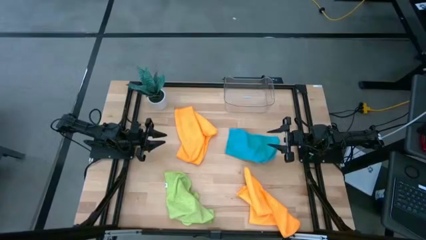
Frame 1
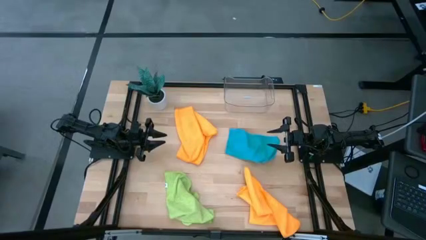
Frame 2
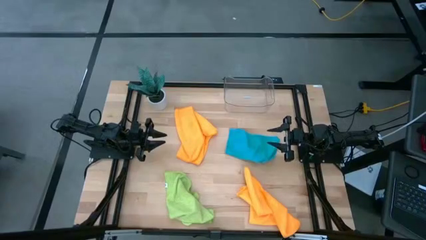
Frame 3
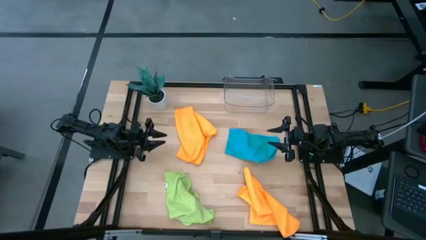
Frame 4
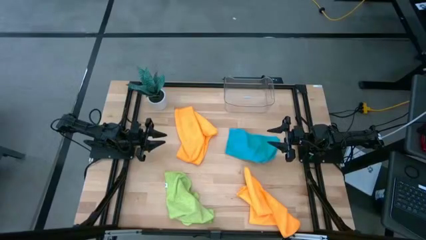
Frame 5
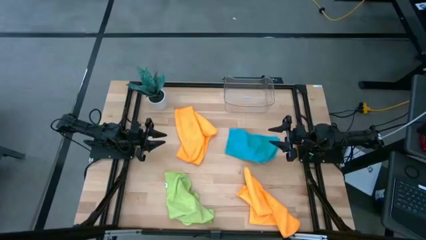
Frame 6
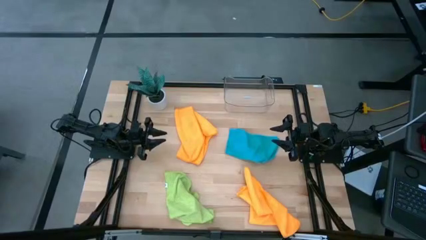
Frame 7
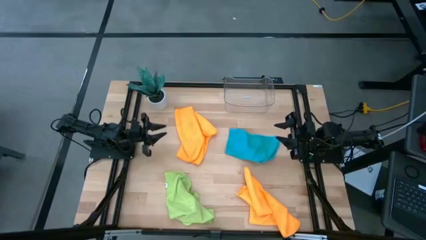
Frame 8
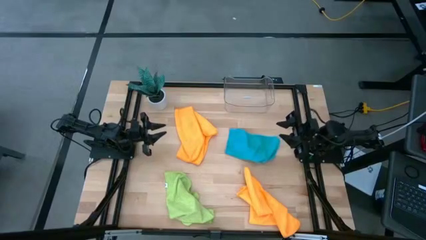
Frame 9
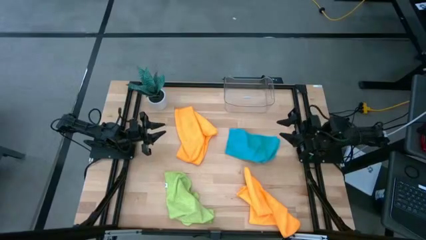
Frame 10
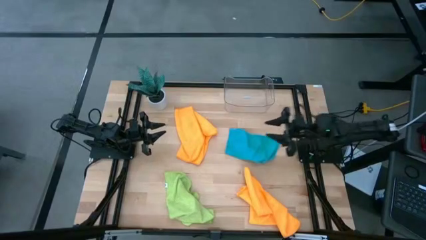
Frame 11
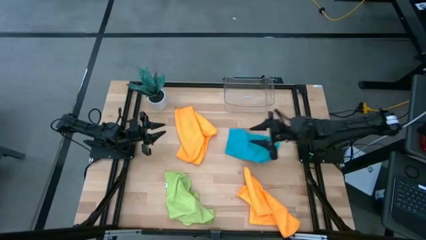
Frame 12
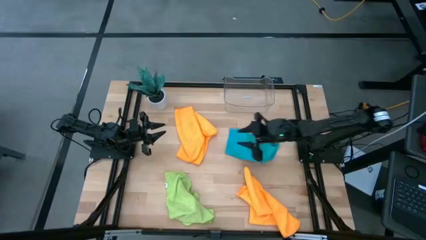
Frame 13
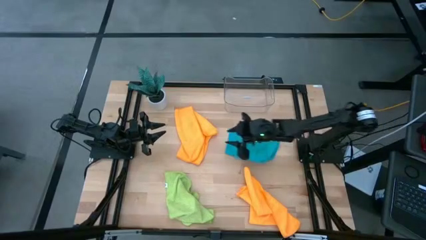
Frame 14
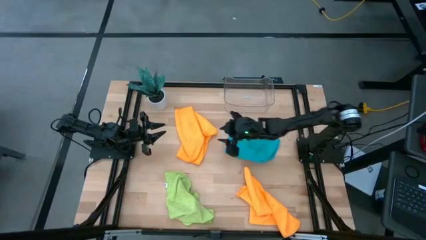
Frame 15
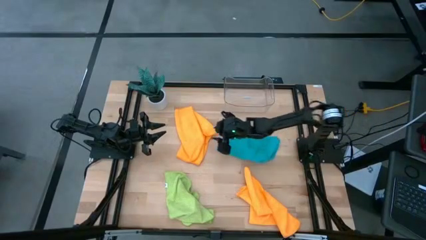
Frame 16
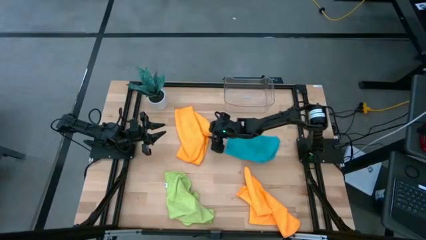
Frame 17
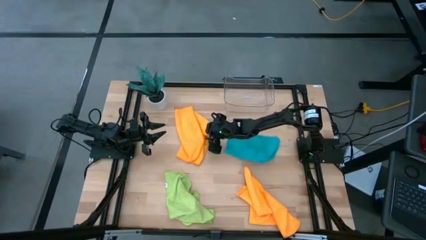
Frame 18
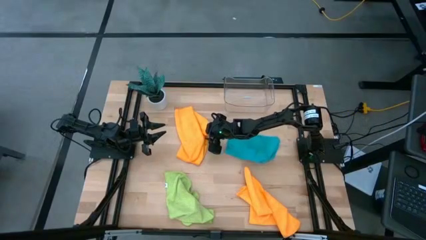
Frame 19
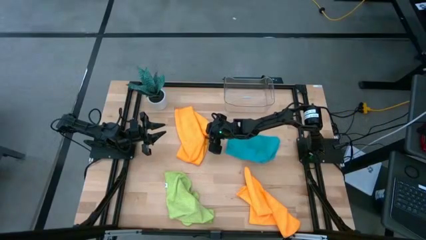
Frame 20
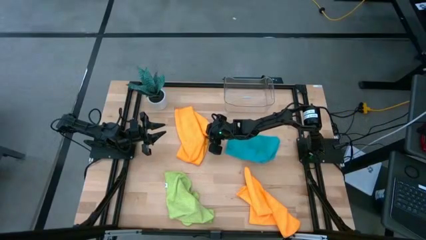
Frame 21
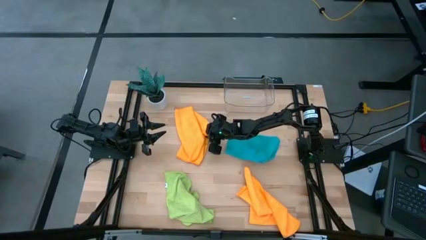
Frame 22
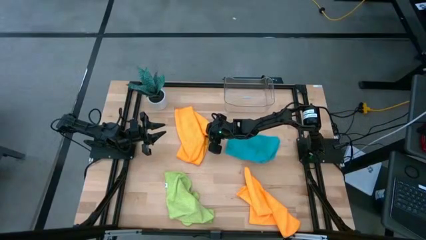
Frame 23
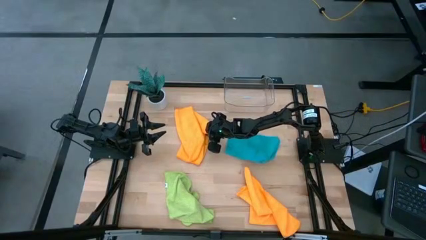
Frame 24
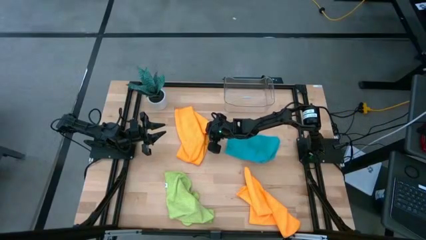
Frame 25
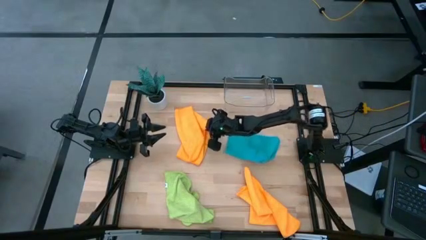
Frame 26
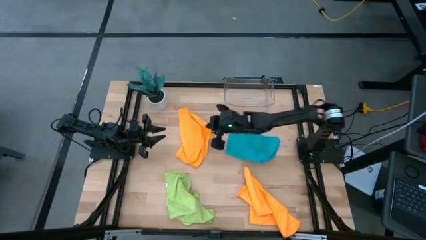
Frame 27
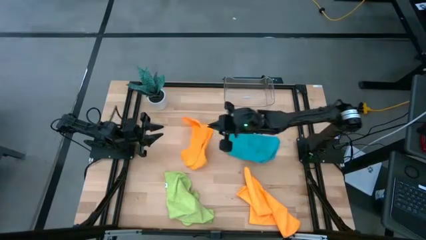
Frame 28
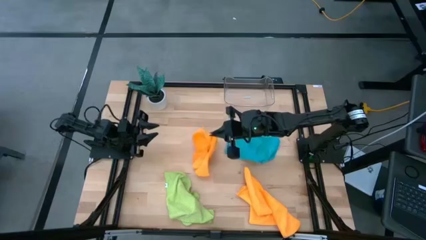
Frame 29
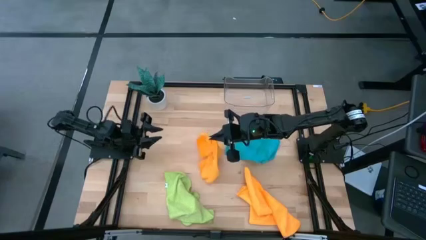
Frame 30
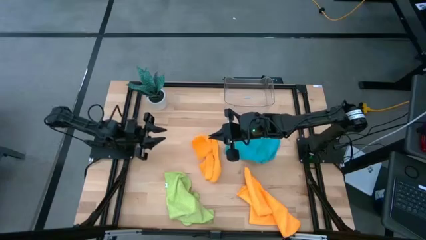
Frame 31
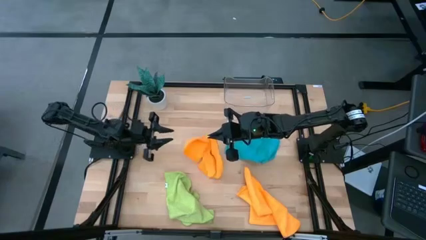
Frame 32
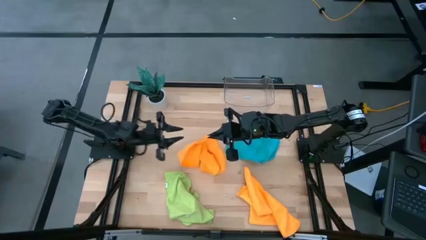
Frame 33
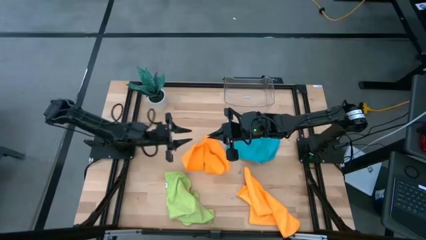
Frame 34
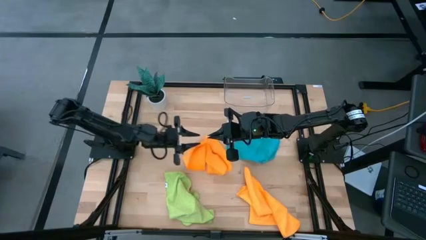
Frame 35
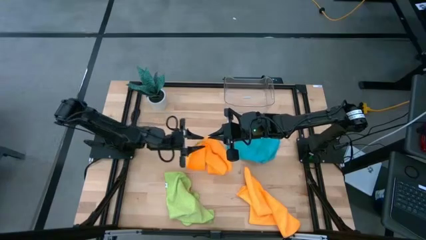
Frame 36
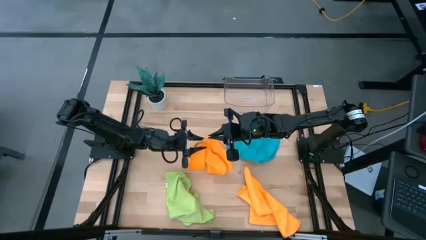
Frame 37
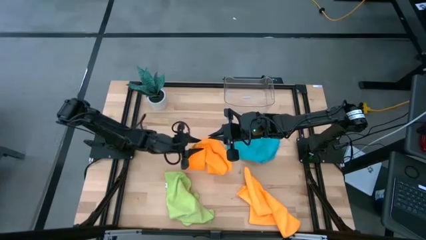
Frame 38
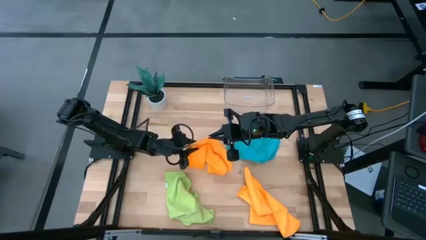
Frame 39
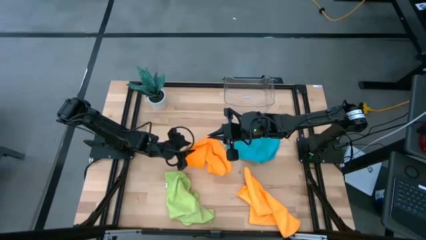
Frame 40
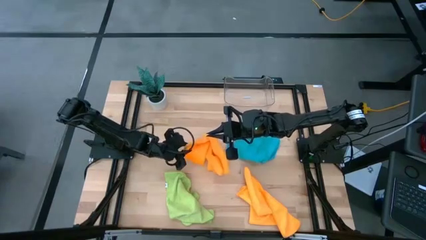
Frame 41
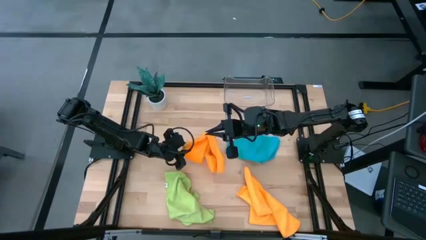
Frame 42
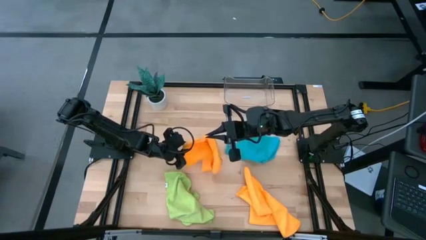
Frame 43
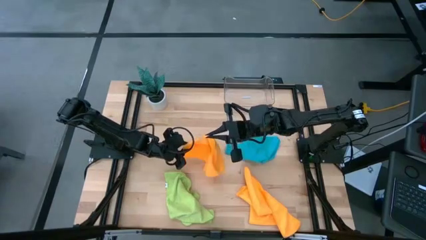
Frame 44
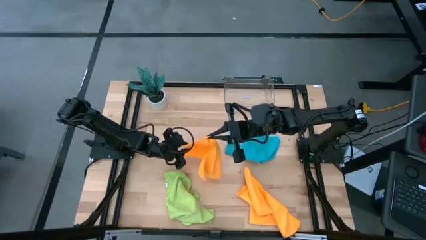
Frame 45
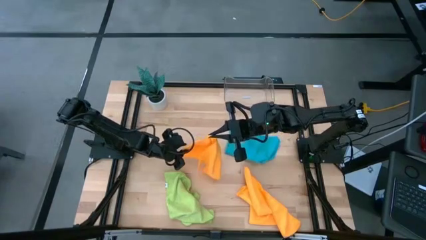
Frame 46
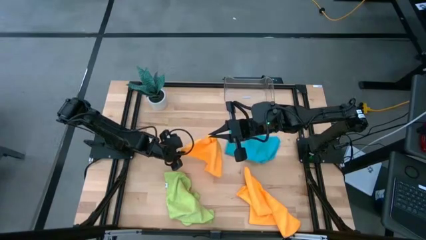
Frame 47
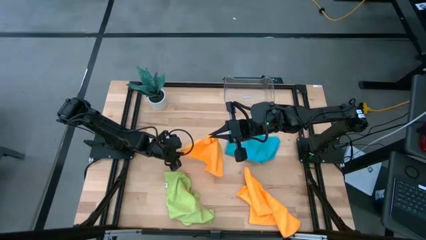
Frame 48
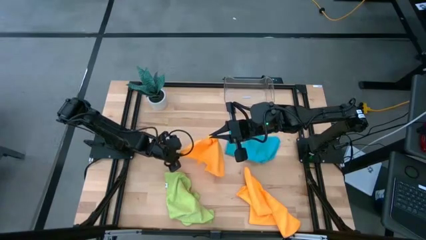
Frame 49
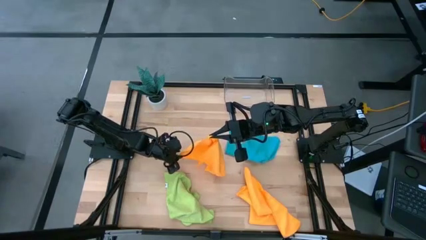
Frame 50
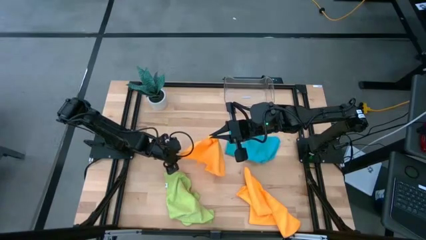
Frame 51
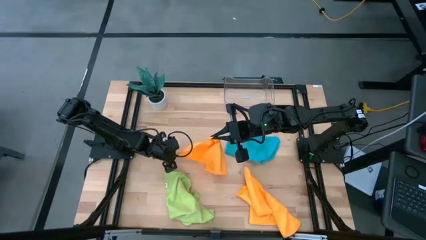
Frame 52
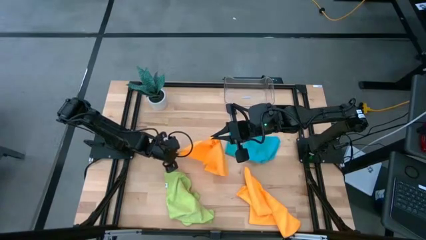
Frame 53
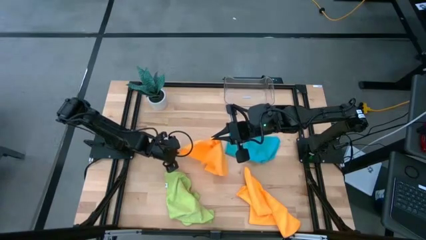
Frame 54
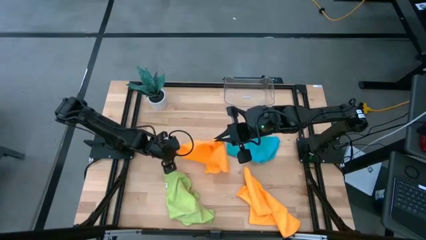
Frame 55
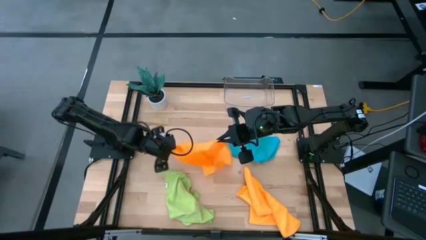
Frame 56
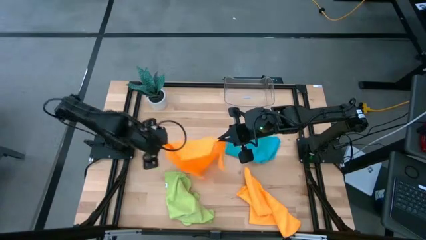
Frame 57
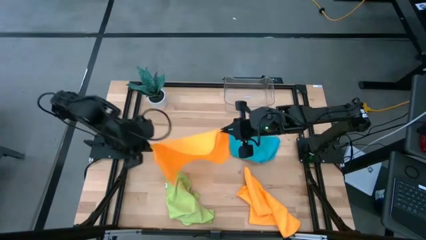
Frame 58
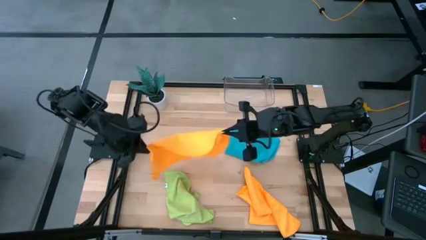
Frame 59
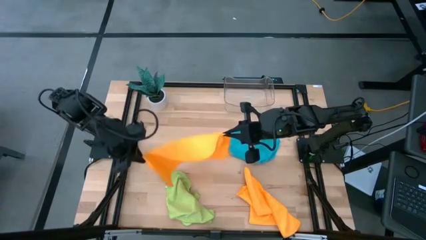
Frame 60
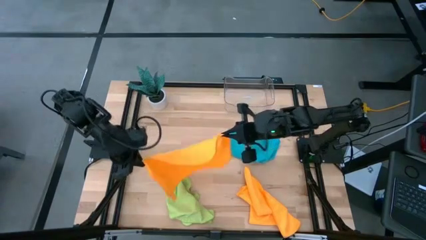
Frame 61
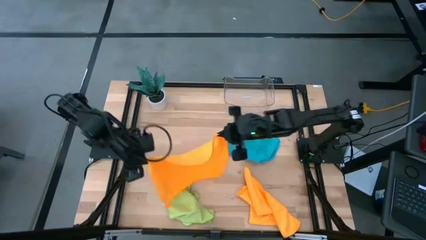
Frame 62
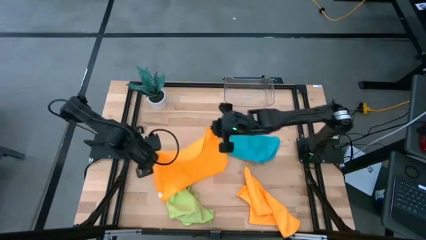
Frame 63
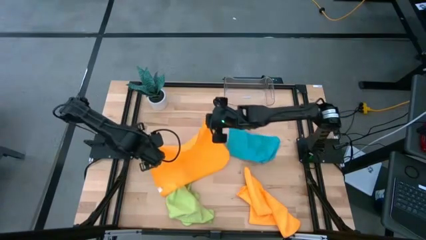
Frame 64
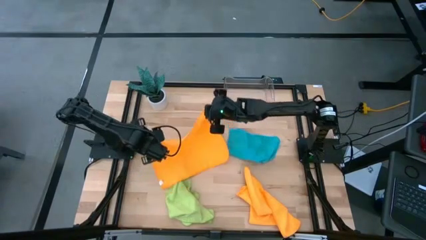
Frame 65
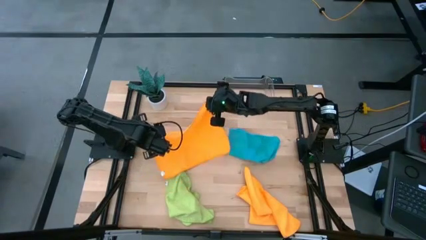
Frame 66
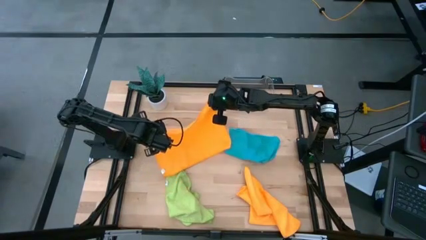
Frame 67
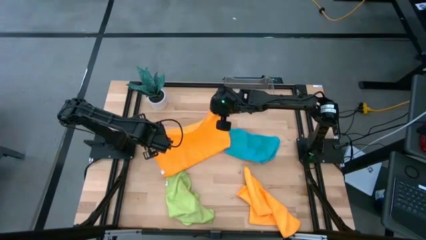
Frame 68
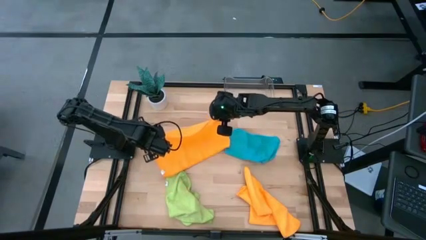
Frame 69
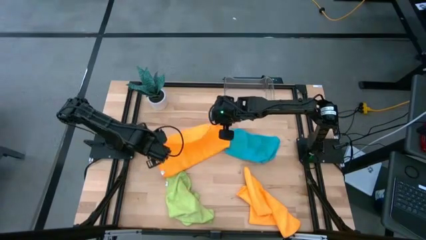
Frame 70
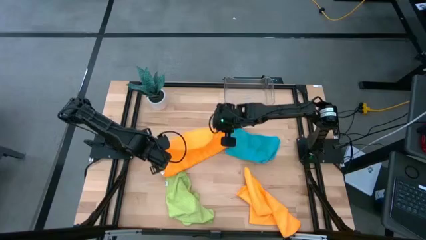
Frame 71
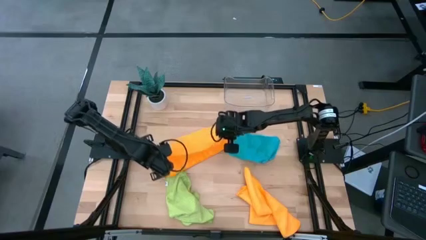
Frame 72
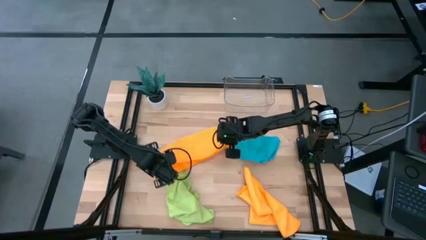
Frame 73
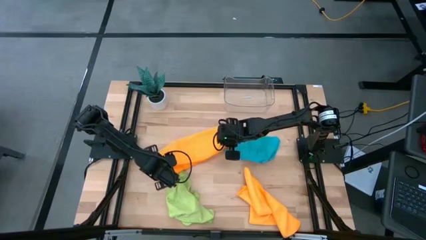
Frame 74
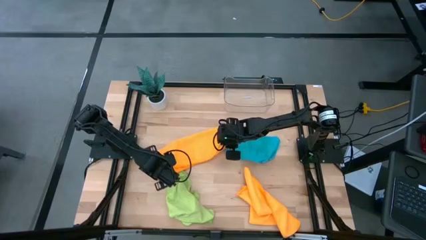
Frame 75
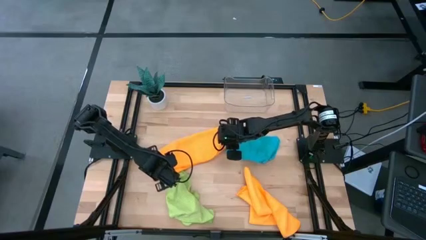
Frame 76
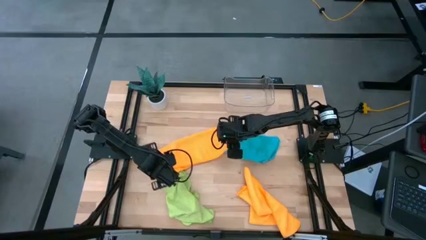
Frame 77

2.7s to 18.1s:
Task: Fold microfiber towels
Fold the top orange microfiber towel
